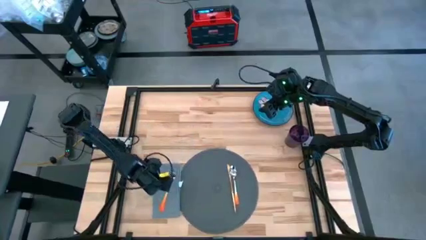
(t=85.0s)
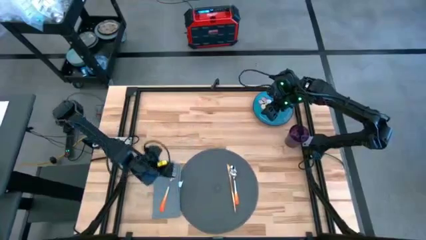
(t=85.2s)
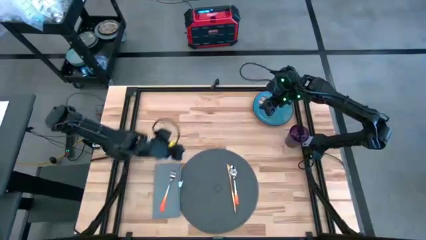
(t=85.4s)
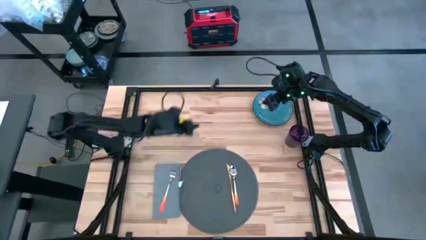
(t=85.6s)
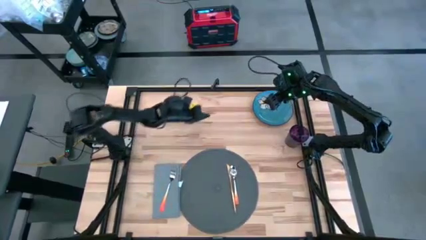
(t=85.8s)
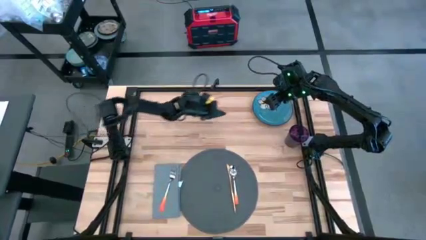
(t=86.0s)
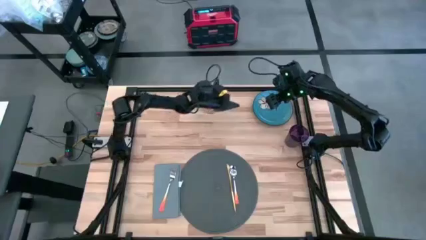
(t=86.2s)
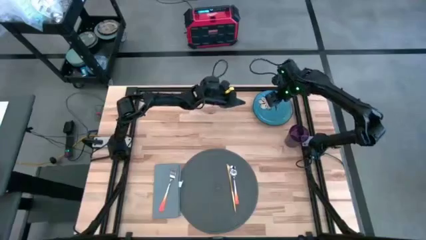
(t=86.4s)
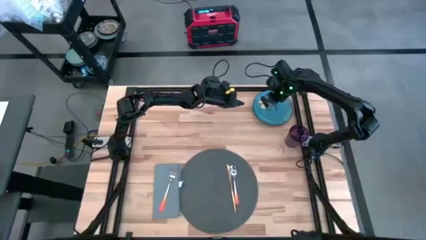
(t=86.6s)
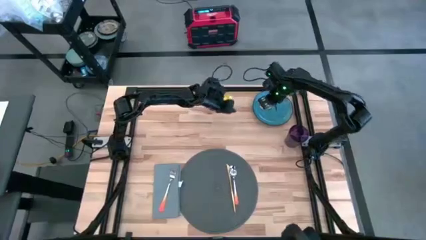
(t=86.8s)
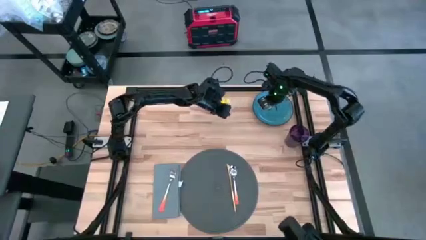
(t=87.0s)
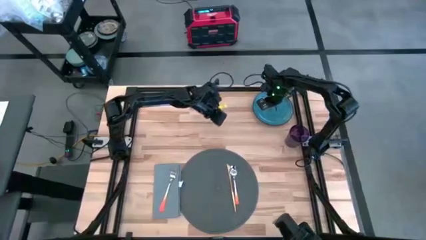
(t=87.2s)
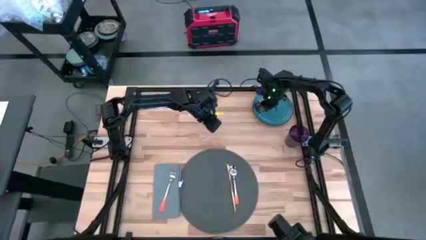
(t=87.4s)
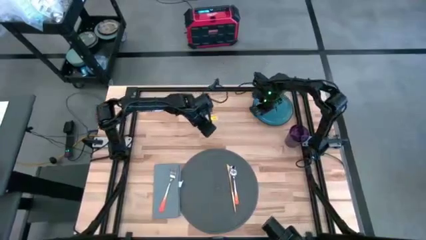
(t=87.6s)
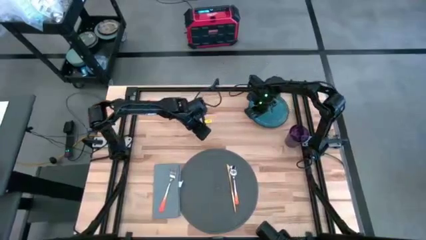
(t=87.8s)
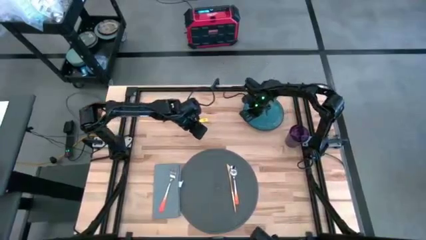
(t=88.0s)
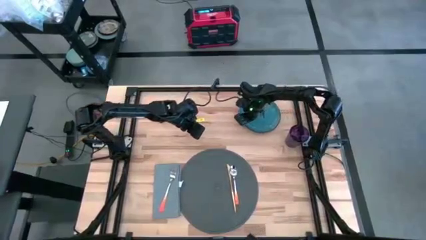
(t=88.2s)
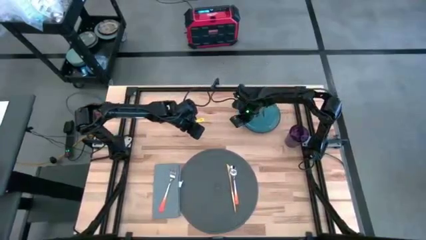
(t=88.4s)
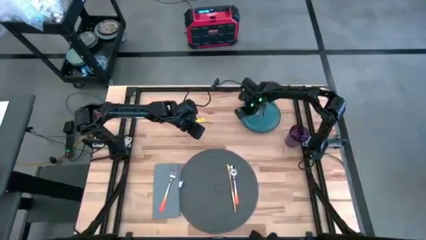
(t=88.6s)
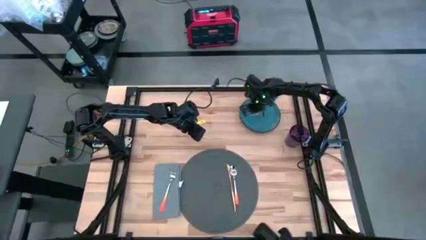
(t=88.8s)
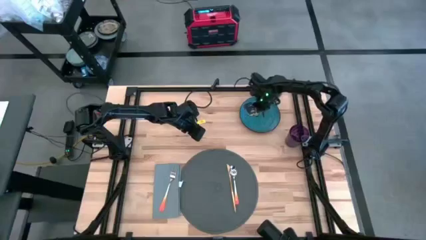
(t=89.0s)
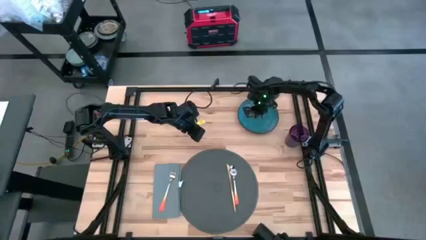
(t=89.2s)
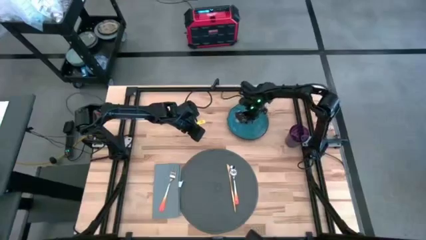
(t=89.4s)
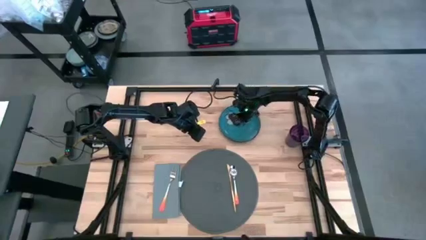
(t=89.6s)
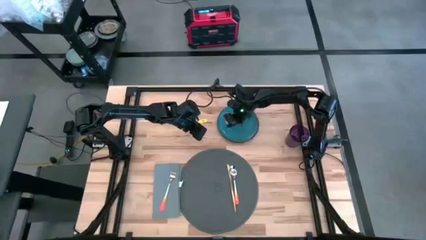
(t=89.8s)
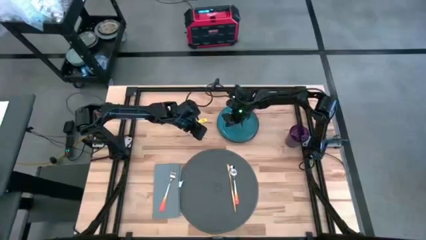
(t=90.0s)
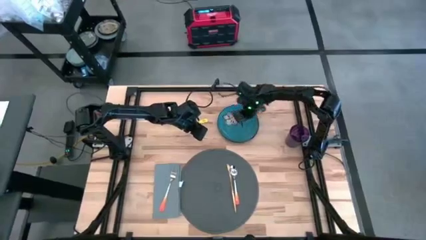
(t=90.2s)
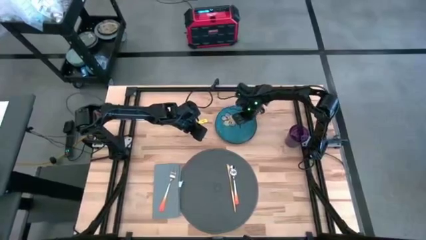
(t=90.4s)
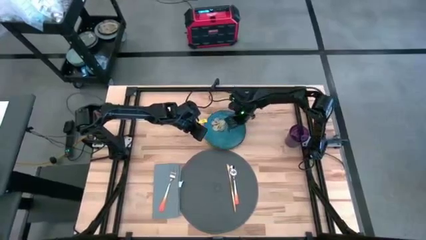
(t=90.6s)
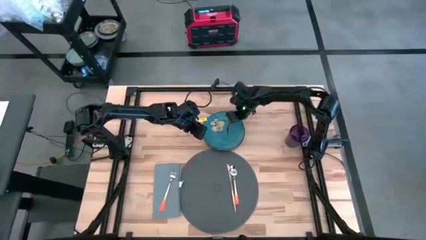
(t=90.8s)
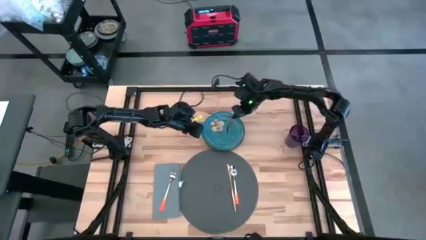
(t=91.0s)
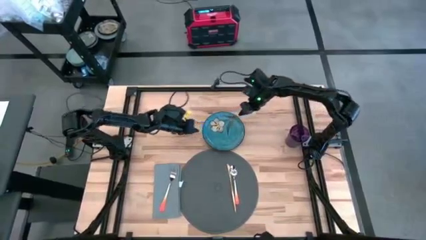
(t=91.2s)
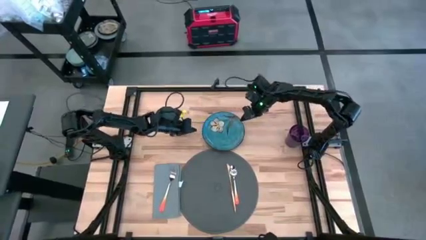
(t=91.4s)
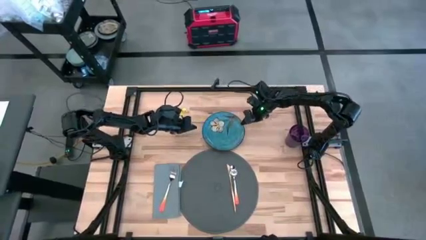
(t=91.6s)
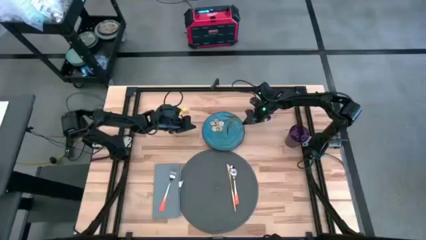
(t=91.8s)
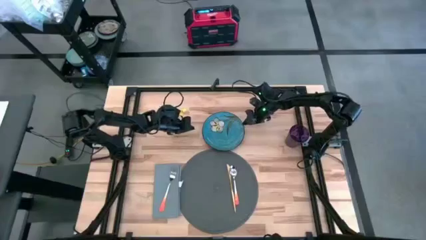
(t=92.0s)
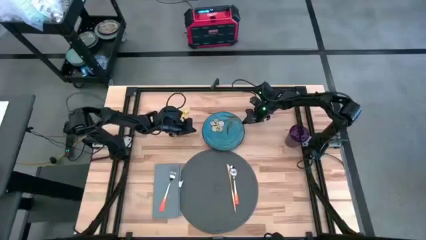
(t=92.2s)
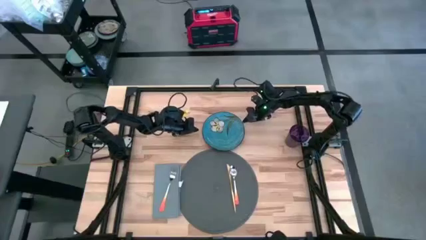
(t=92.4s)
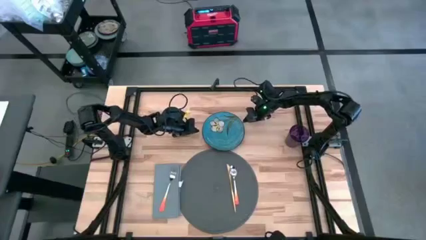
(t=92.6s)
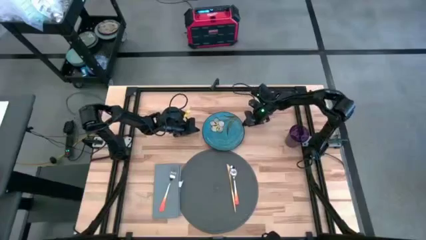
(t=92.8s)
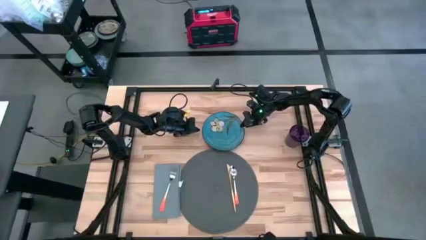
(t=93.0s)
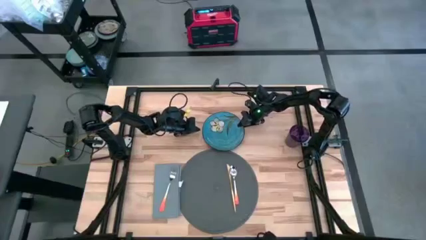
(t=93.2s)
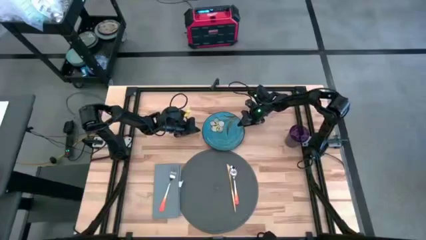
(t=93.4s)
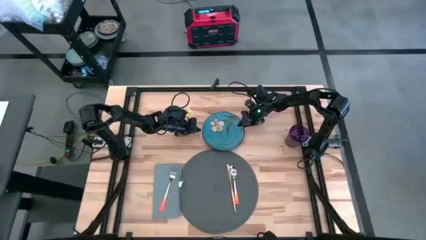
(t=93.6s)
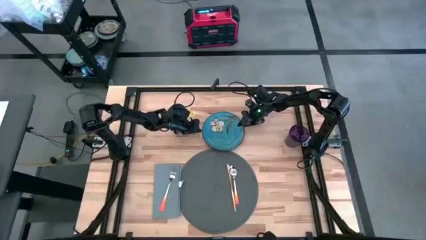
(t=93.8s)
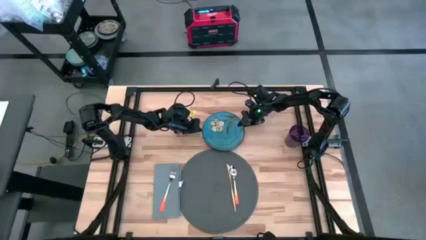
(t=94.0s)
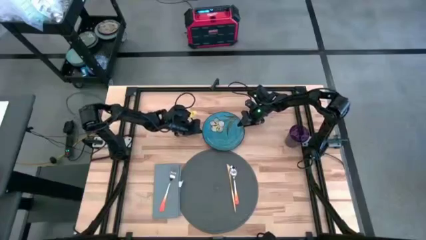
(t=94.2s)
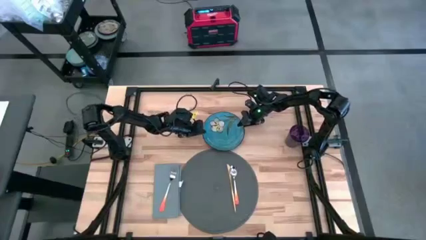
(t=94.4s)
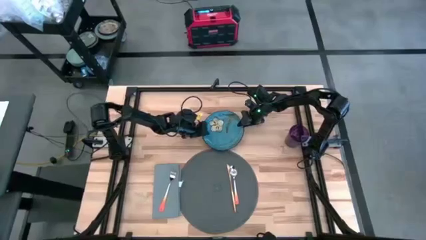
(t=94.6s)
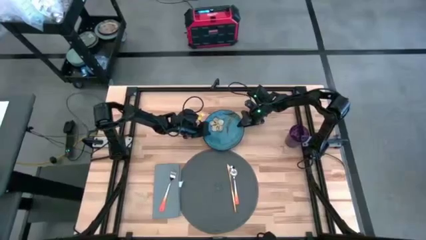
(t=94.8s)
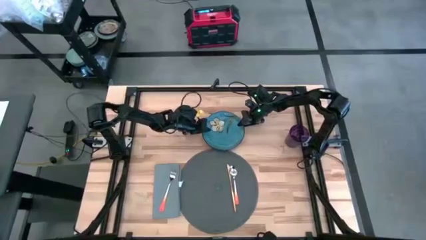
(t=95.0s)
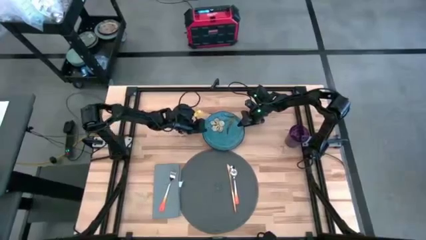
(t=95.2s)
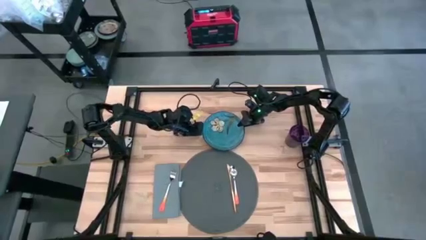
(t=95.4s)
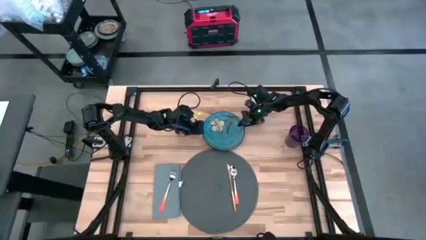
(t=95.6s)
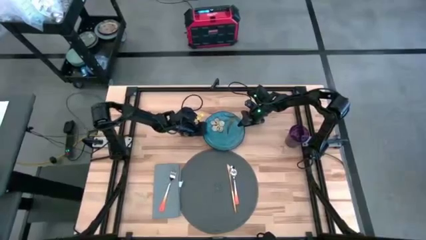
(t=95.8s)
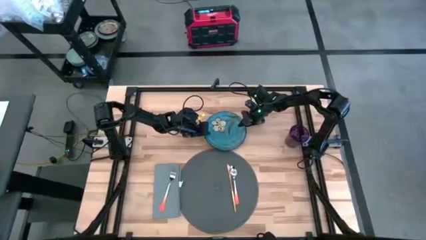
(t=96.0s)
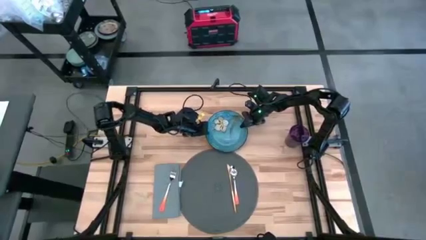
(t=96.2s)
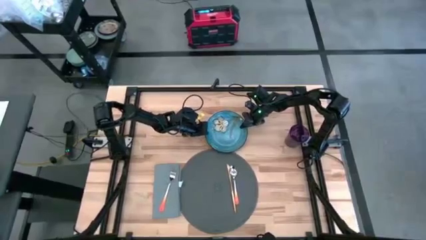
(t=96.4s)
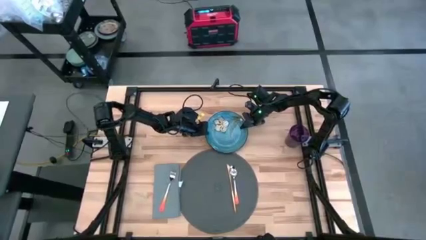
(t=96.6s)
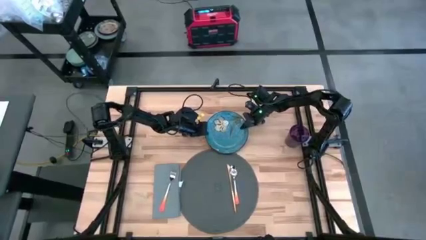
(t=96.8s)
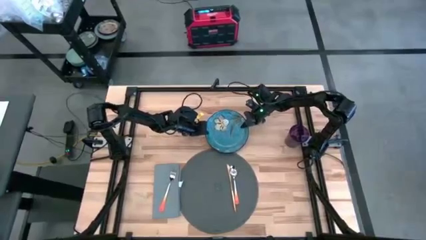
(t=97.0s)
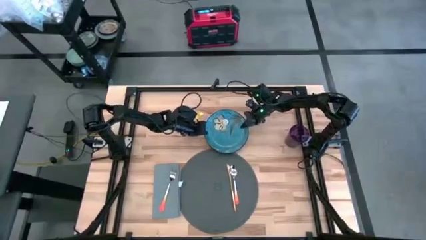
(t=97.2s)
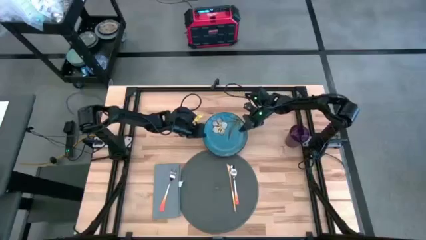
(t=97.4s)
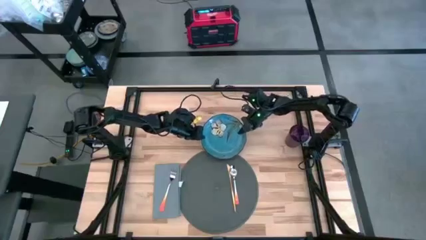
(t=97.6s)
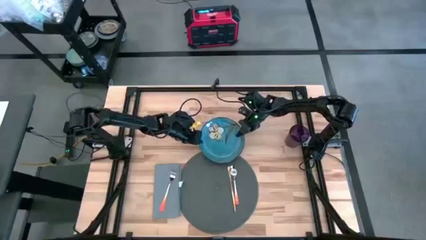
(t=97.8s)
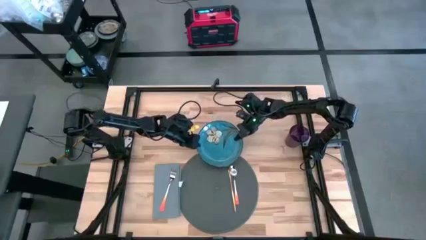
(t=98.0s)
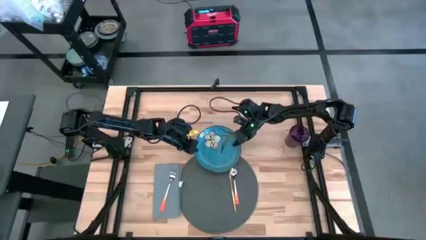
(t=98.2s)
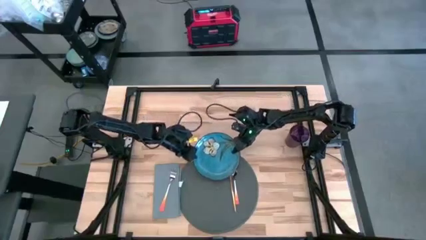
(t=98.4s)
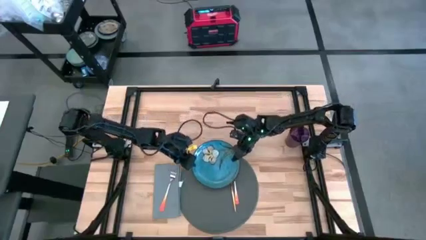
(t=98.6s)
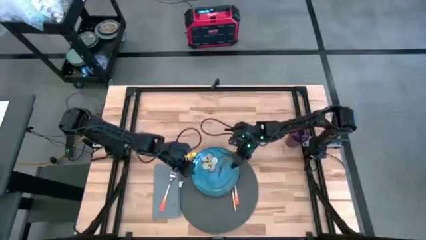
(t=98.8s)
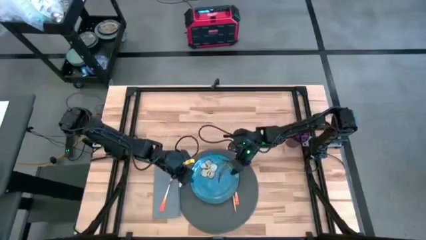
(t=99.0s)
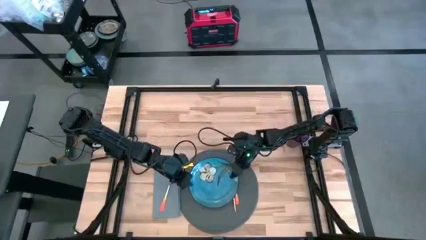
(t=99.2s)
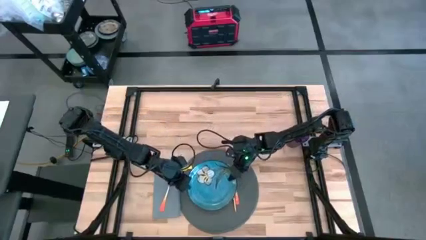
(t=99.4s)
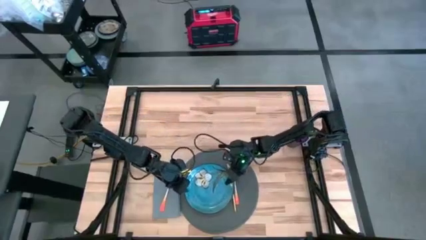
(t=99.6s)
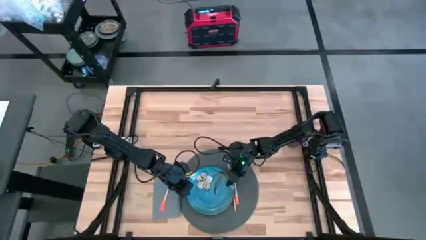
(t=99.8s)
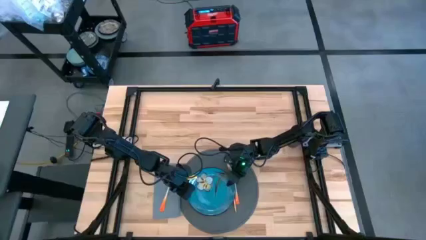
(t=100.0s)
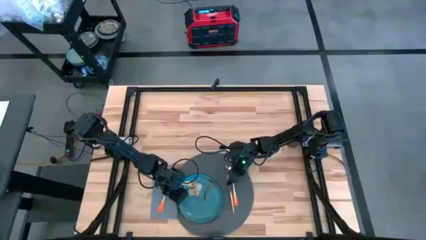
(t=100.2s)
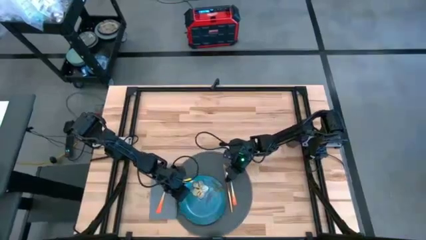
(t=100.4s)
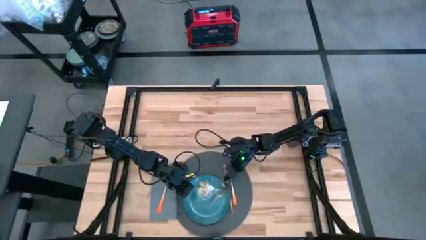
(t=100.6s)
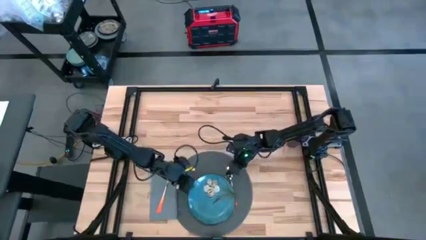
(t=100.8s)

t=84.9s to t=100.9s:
Task: Set table place
Put the plate on the gray table mat

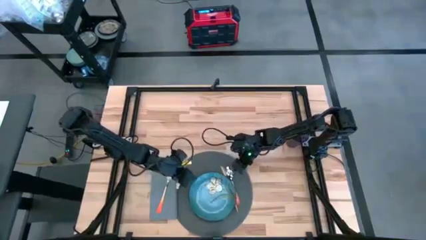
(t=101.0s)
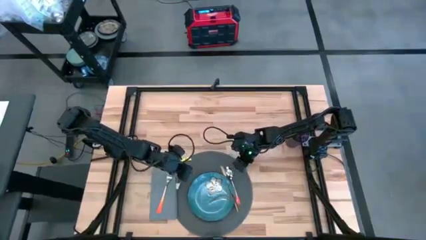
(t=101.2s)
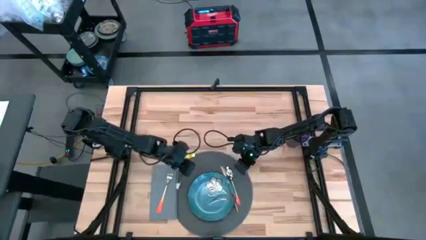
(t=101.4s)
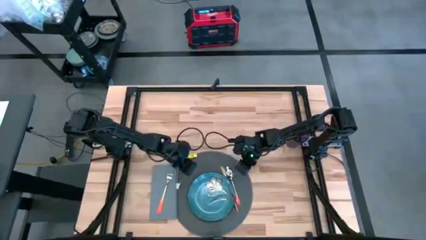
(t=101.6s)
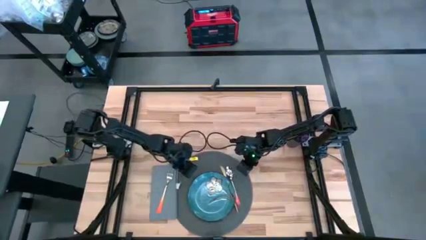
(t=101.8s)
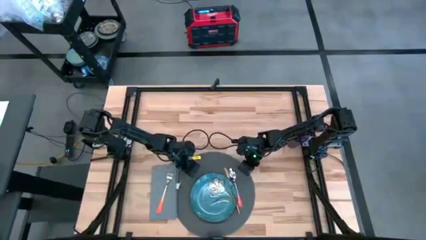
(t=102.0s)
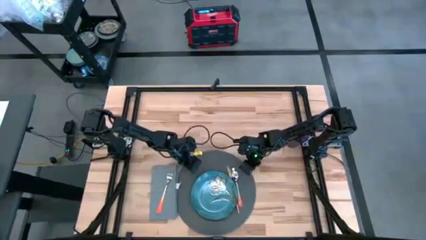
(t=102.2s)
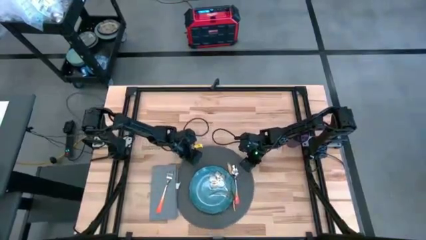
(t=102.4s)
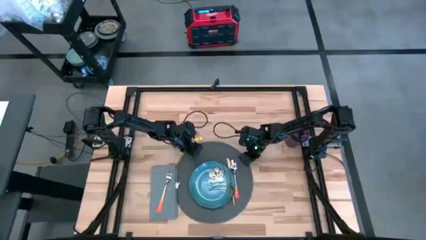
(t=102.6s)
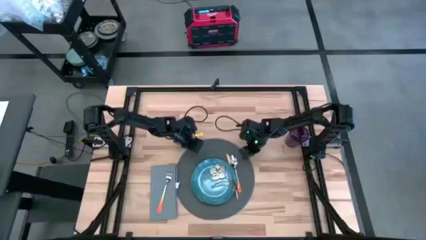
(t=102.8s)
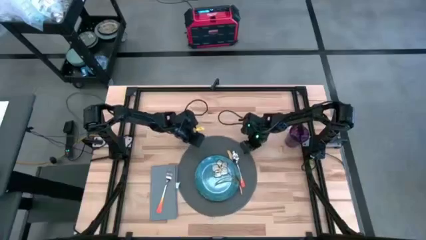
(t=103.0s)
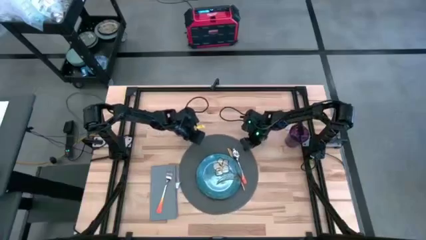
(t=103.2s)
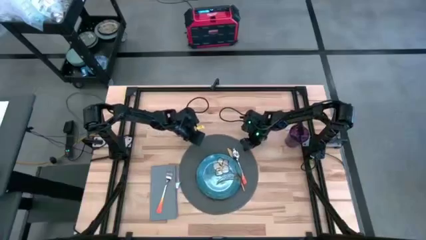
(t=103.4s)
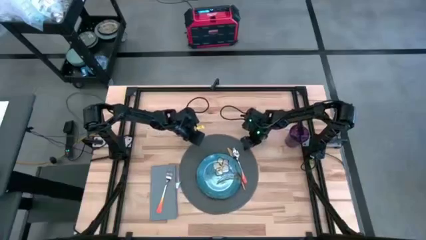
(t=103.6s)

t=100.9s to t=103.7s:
Adjust the gray table mat
